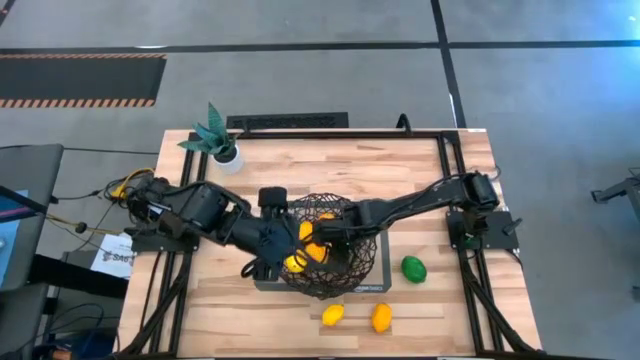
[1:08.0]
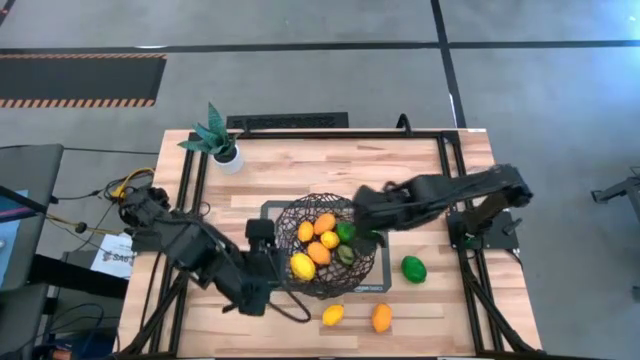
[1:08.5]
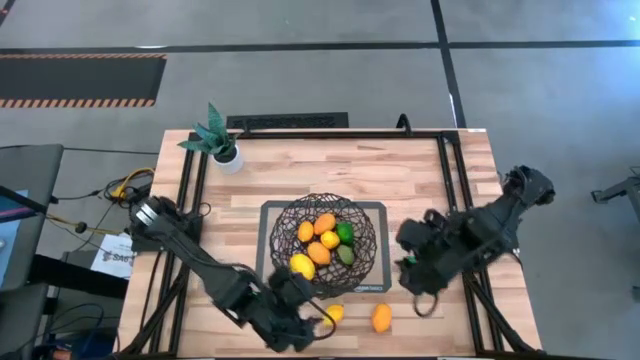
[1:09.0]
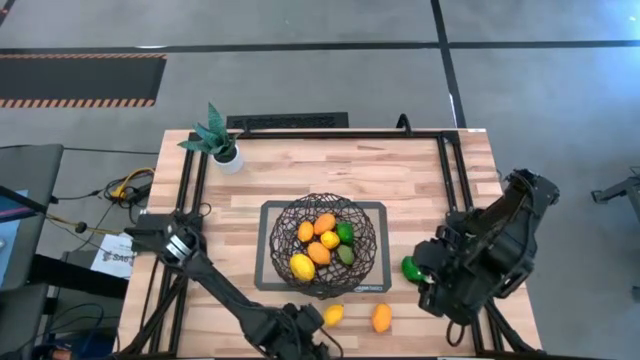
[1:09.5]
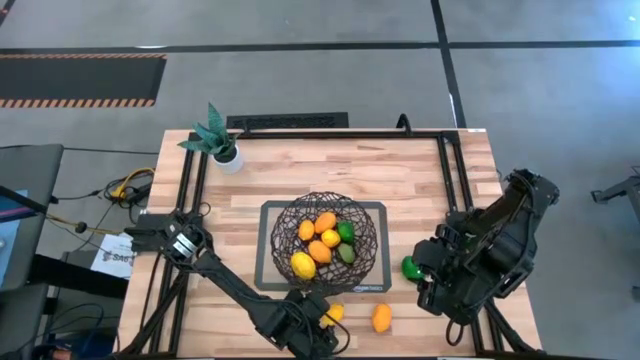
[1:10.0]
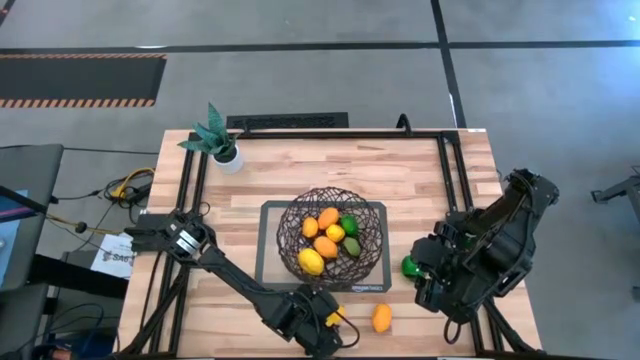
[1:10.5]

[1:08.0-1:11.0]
Task: Build produce basket
Put the right lemon into the basket

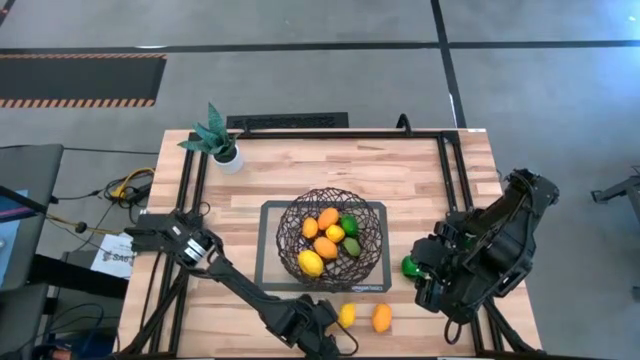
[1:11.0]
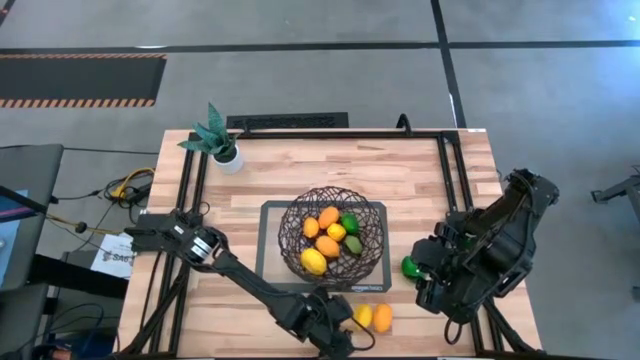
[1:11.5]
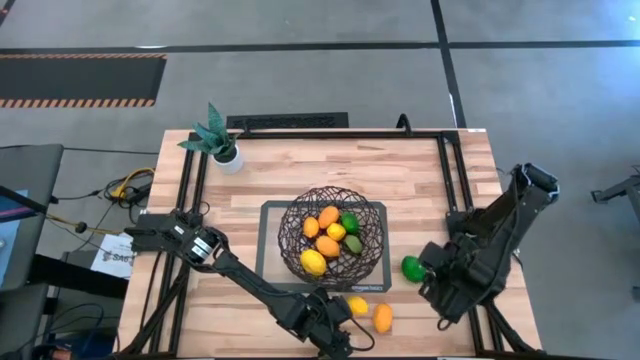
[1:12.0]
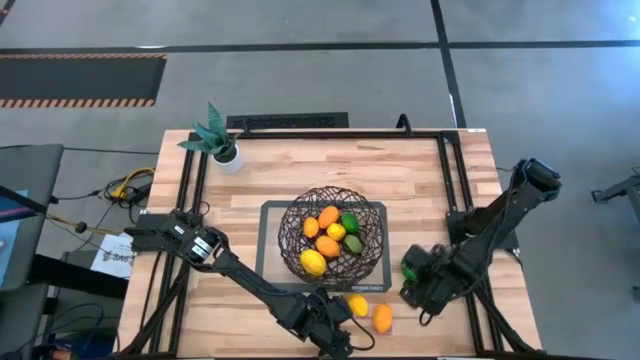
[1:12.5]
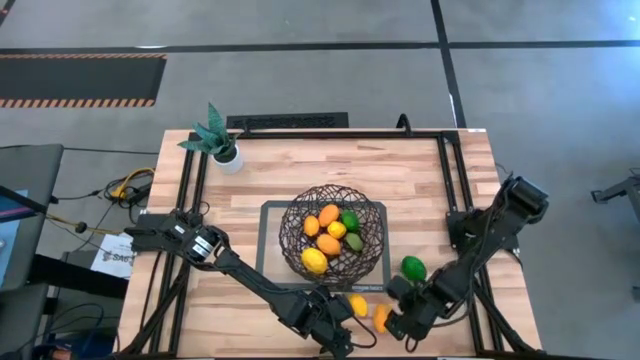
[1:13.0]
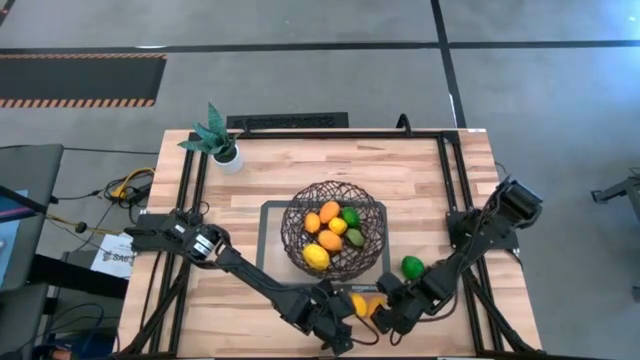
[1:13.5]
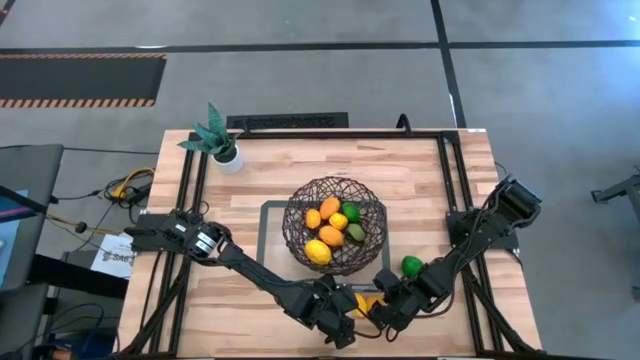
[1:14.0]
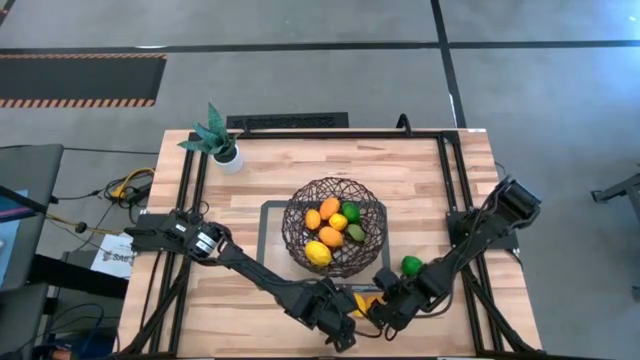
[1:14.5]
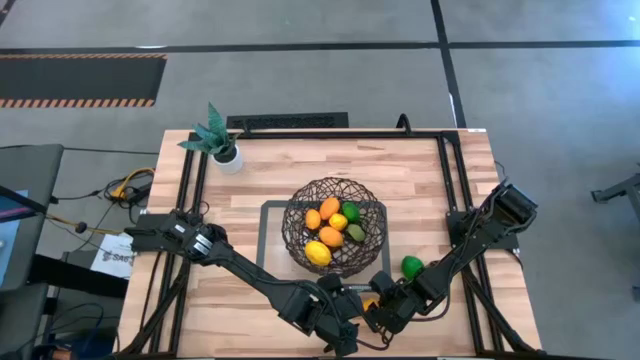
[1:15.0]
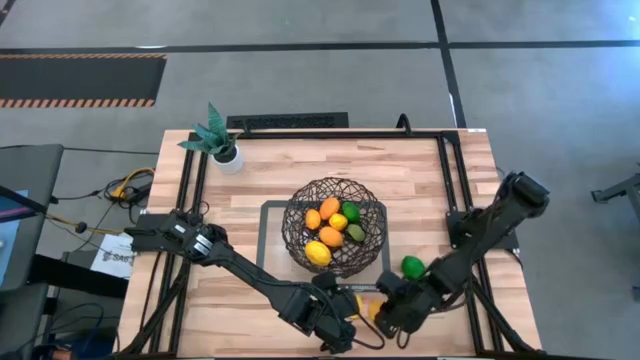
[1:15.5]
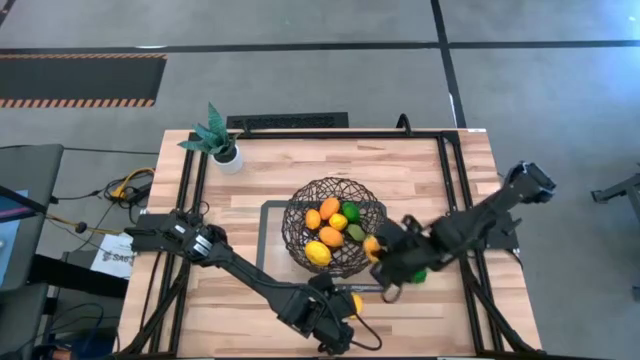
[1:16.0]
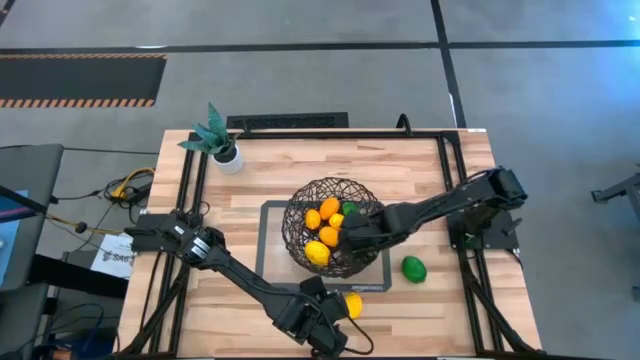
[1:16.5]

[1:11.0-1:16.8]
Put the right lemon into the basket

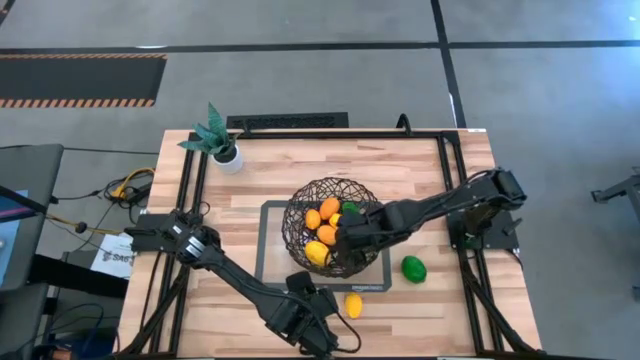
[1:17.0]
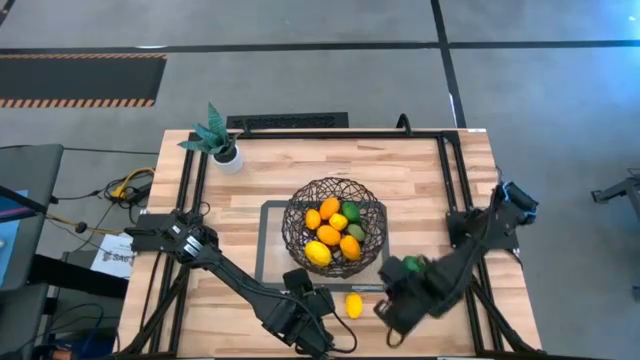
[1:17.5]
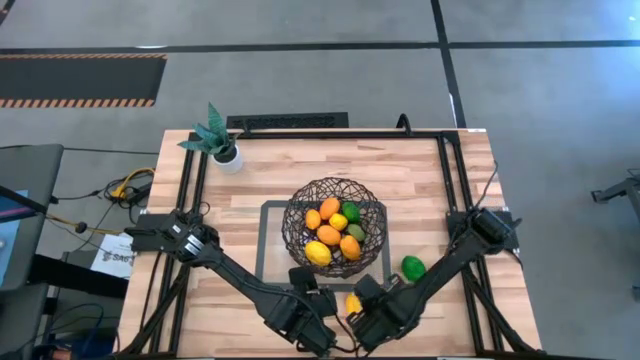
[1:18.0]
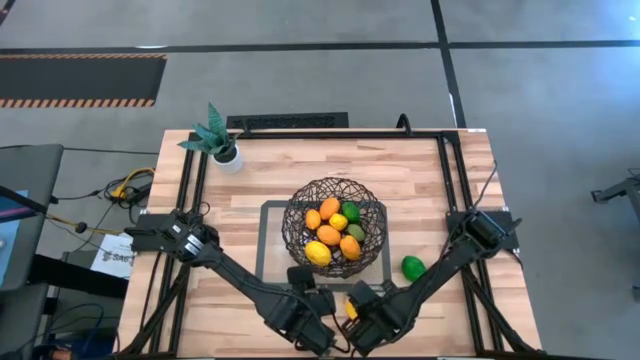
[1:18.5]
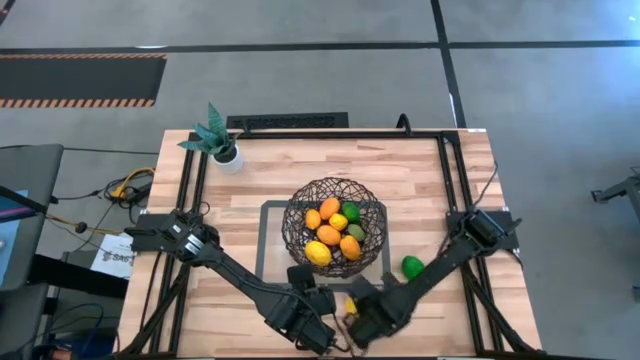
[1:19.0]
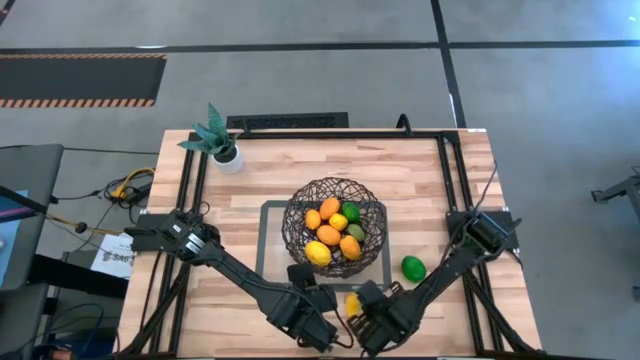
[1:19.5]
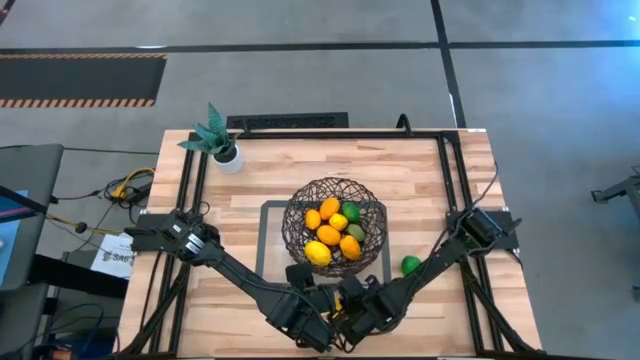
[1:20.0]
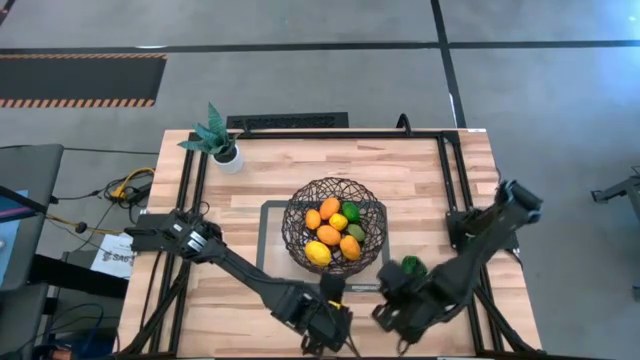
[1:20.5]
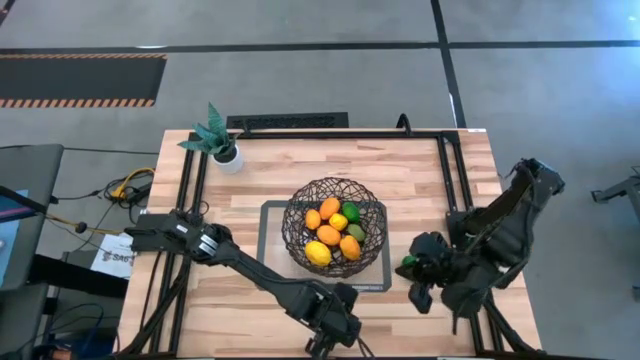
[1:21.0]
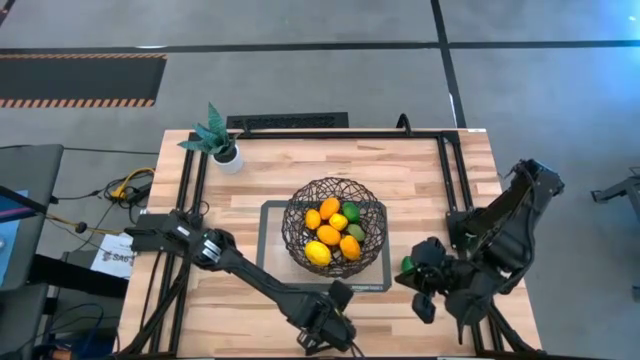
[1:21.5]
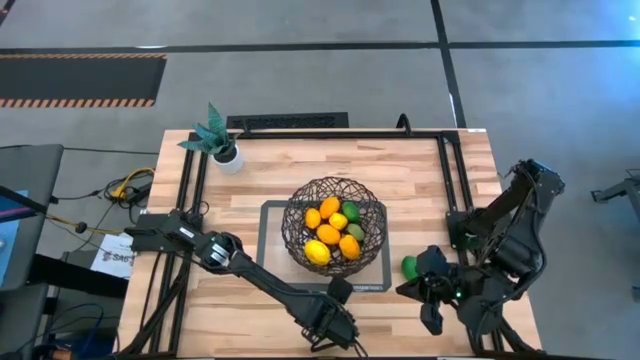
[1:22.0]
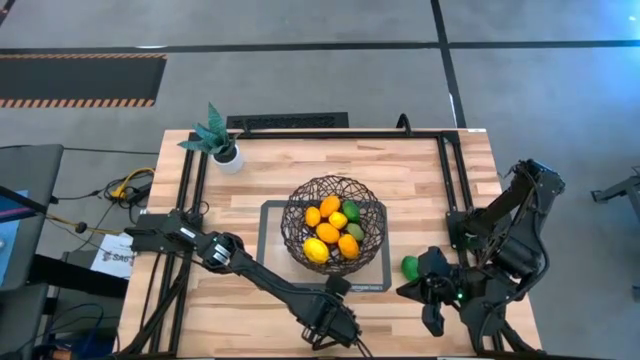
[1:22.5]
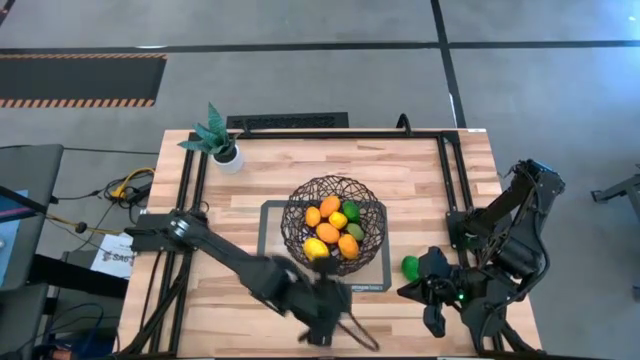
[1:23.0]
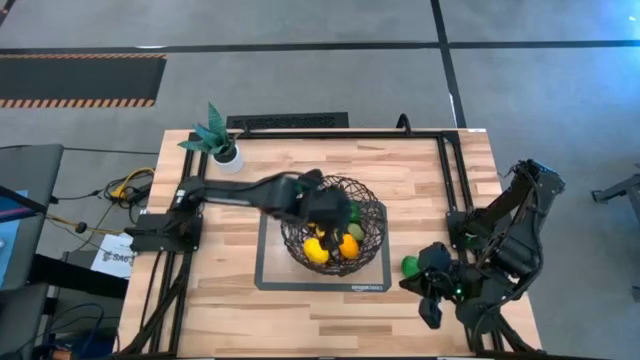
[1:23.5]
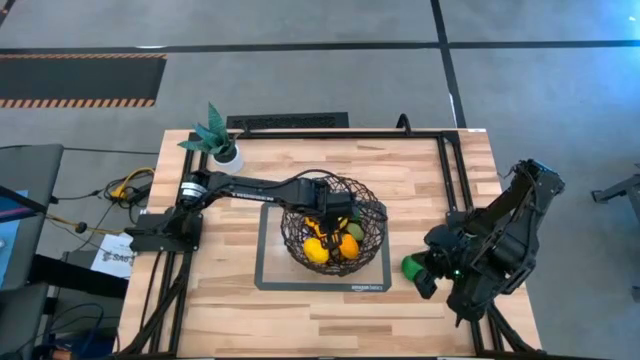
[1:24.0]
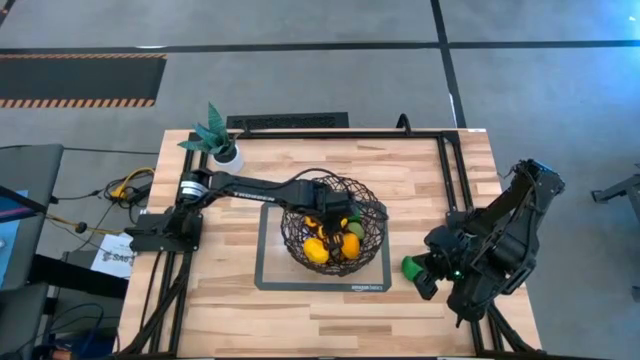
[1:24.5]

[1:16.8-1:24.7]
Put the lemon into the basket

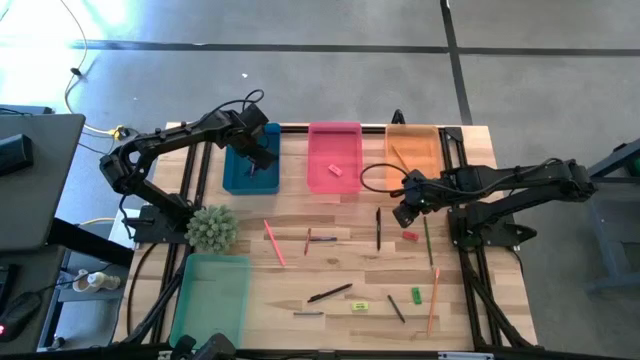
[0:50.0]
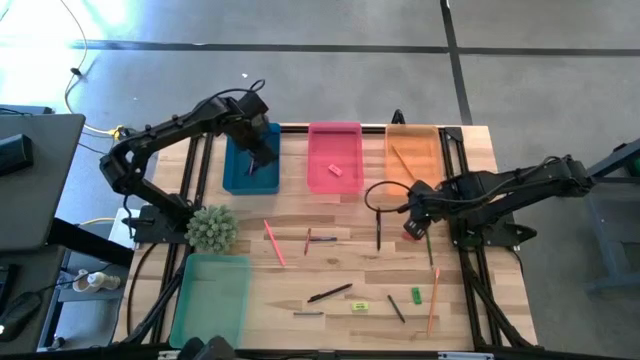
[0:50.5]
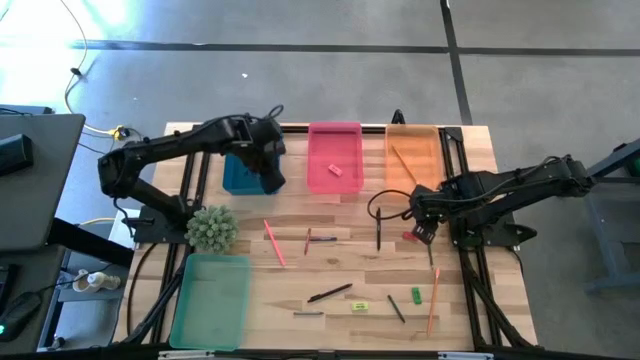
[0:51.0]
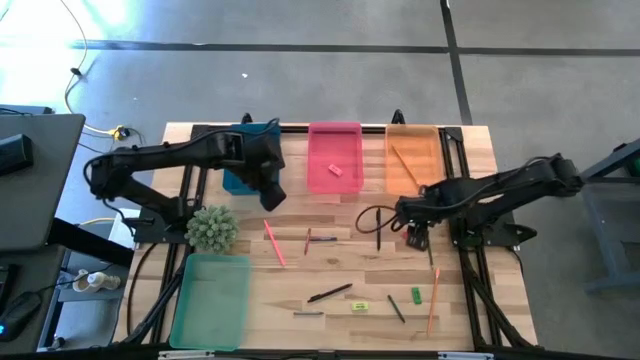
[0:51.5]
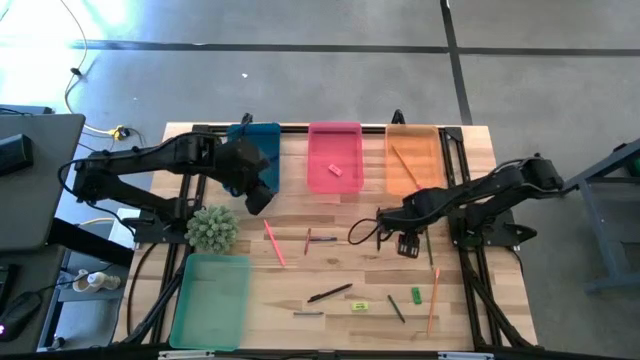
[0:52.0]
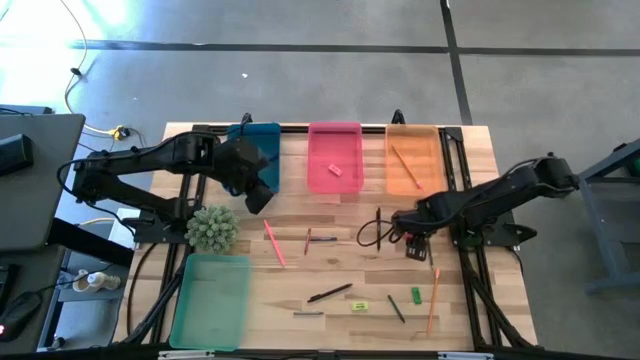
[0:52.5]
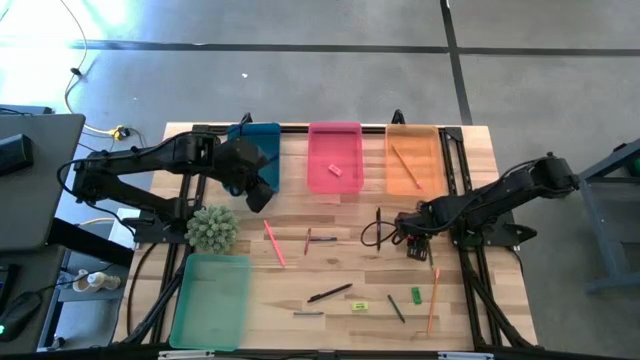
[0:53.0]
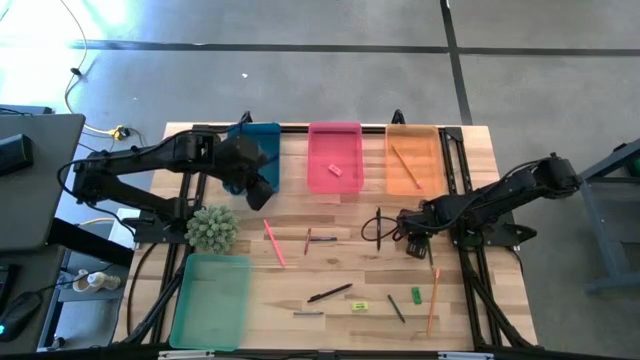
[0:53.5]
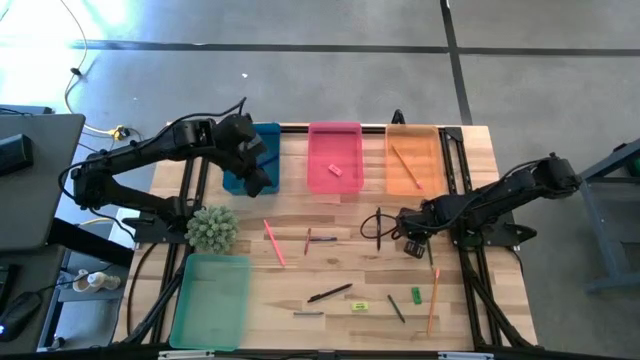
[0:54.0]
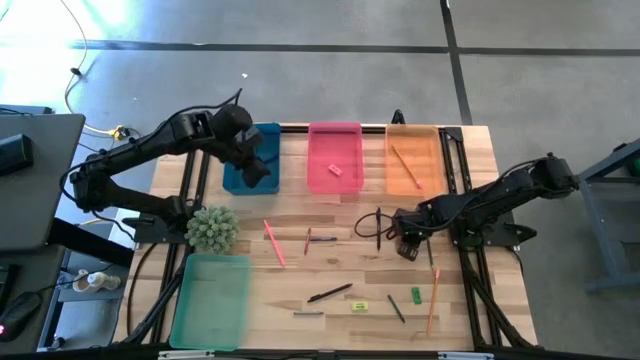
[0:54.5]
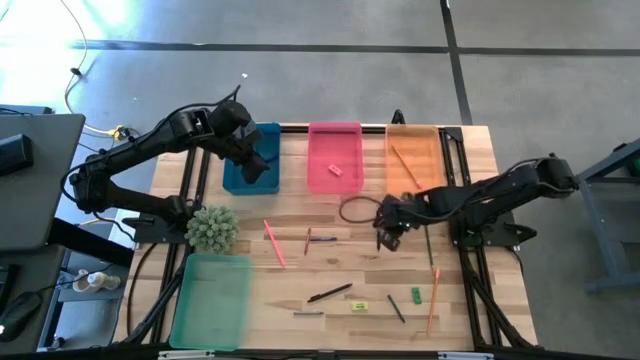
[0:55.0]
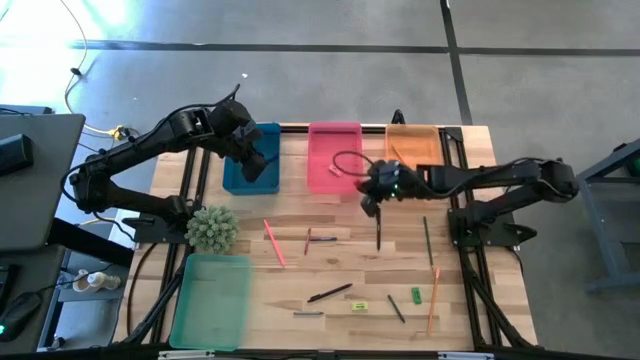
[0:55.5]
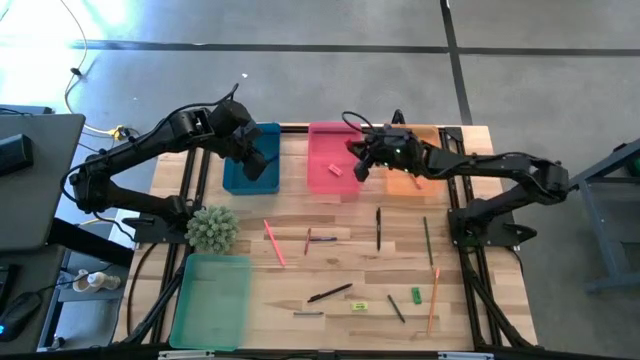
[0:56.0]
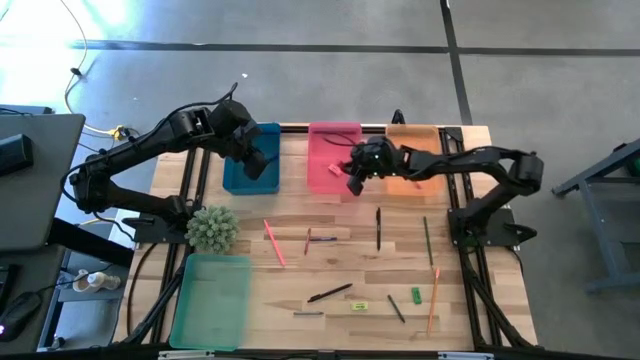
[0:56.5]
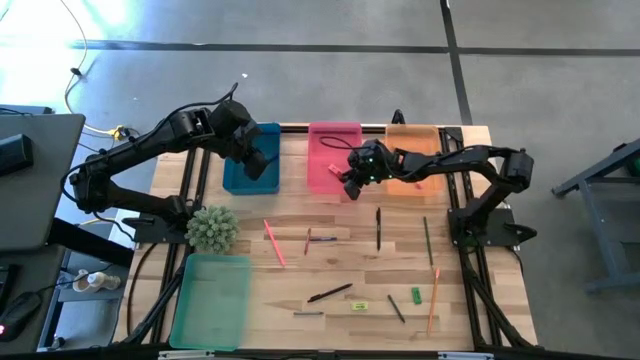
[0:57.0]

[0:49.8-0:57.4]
Task: Sort crayons/erasers/pens/pencils in bins
Put the red eraser into the pink bin
